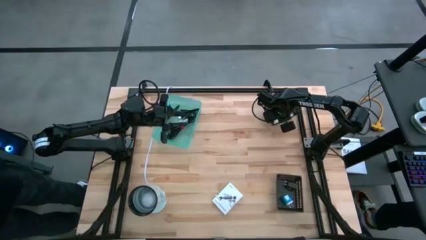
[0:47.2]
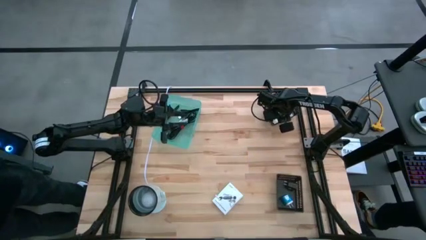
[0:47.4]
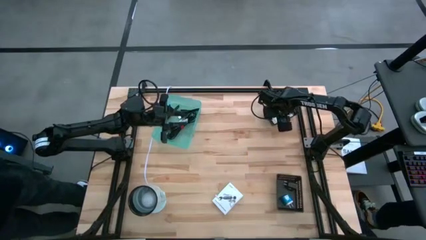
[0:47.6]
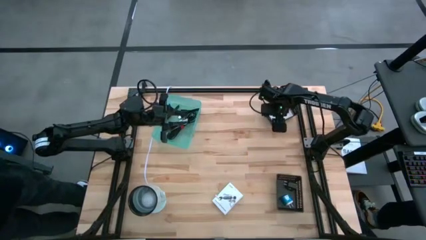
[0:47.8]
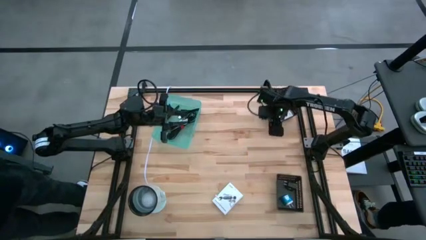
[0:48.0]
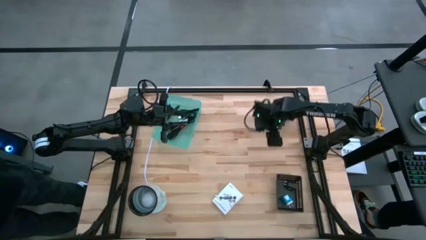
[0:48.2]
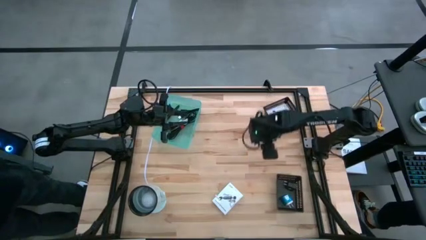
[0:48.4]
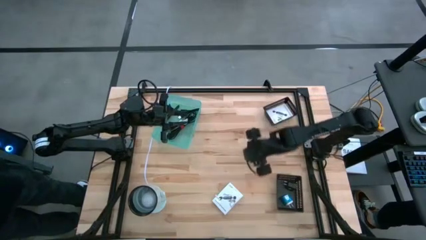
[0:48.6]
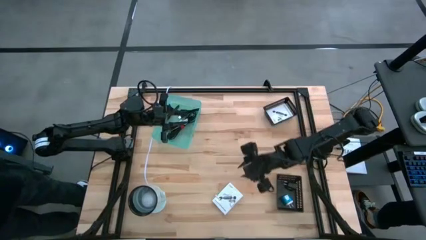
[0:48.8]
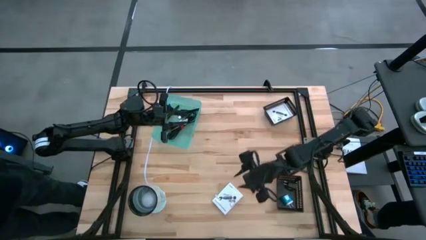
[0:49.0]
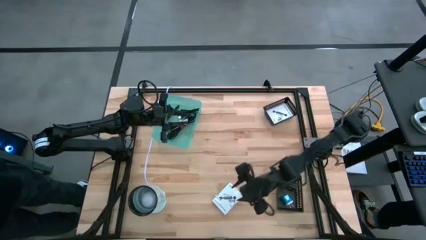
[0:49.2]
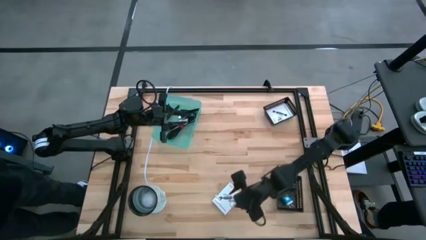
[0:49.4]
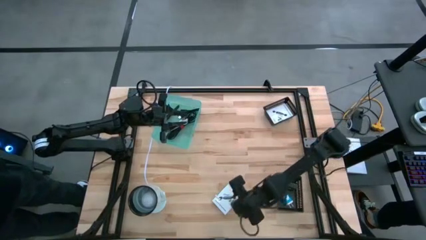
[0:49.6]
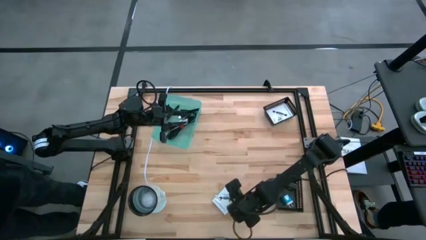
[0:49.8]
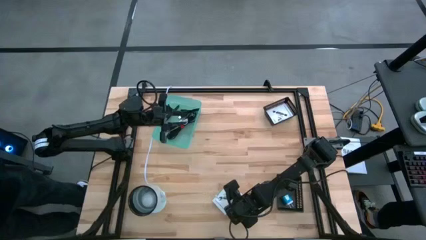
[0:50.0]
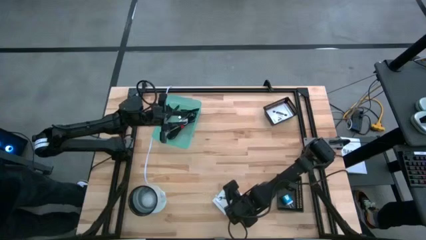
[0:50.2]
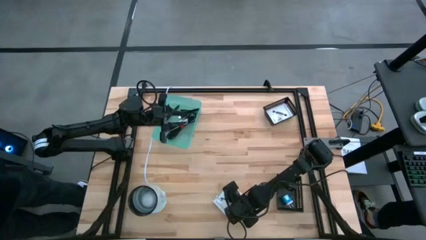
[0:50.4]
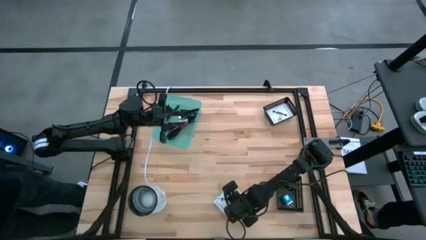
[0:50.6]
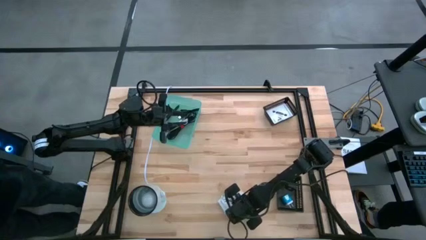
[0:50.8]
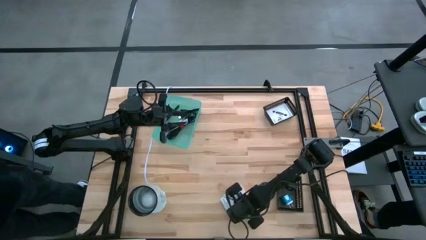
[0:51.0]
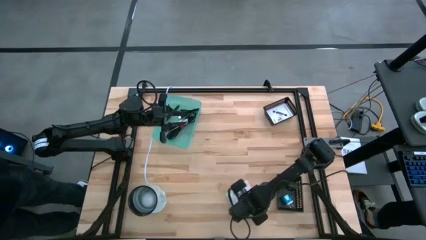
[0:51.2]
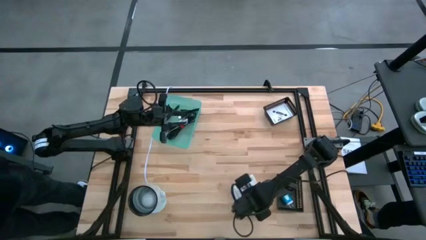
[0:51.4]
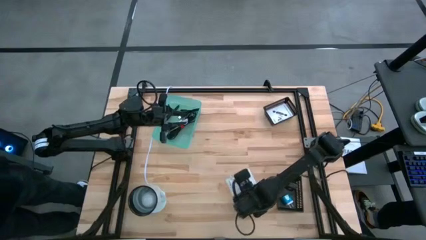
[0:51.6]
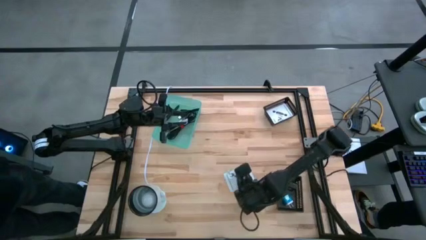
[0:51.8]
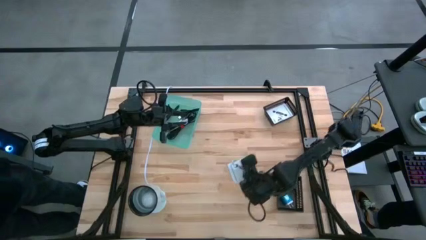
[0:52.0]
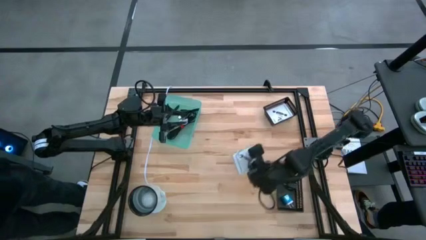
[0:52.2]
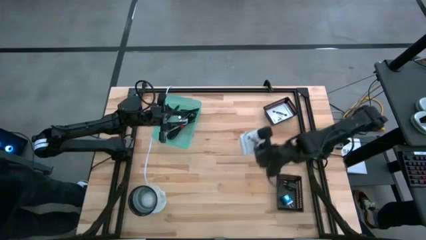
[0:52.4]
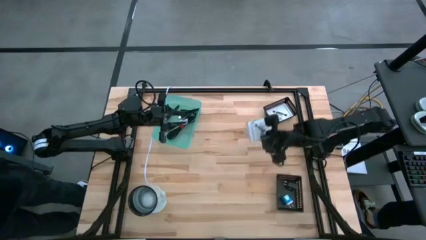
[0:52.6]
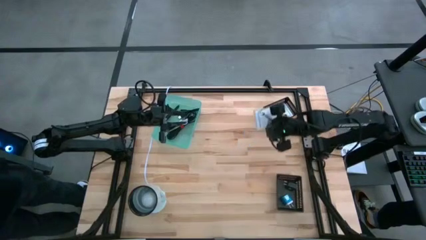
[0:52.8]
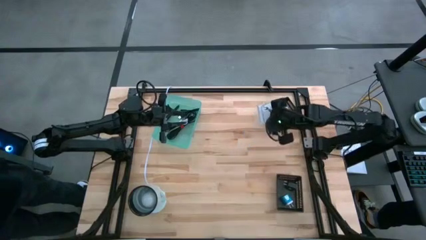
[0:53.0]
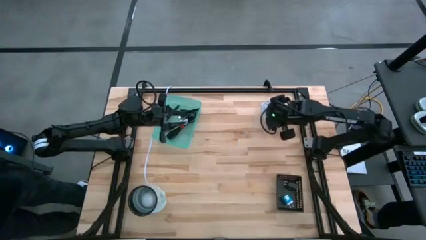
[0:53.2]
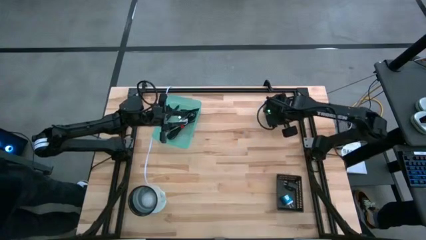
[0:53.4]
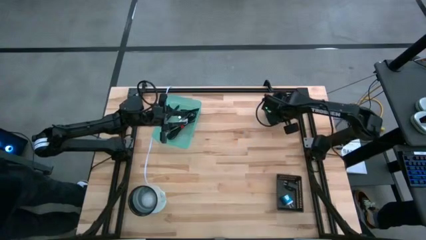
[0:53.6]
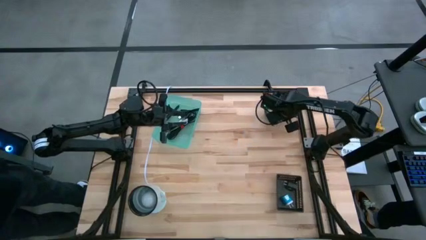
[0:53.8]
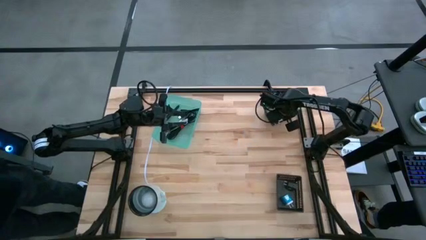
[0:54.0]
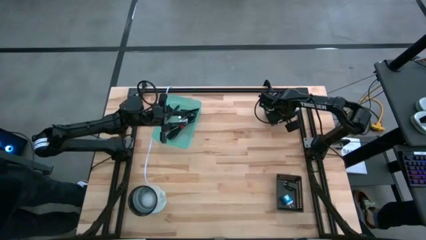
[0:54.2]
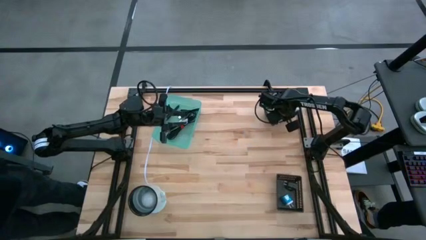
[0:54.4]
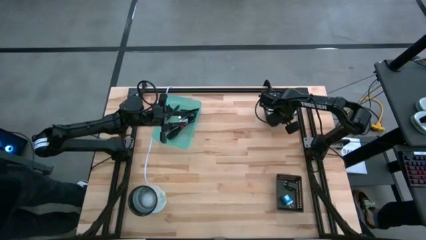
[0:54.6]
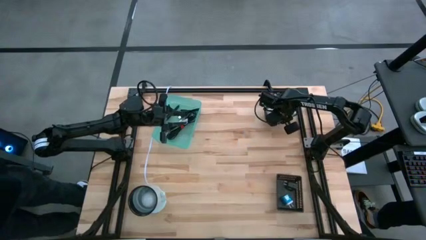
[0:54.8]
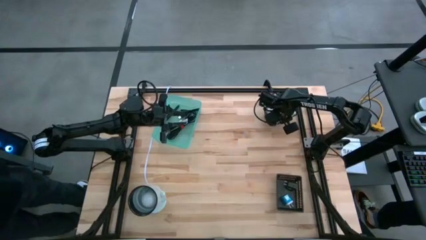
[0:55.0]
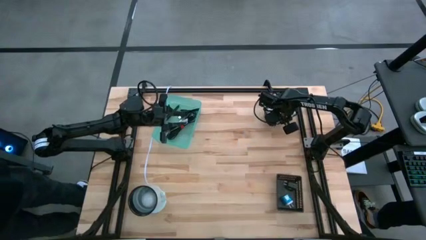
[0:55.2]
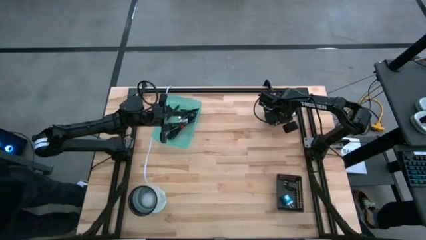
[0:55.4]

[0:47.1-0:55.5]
Task: Pick and place items into bin
Put the white card reader box into the top black bin

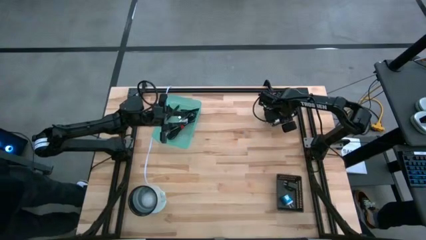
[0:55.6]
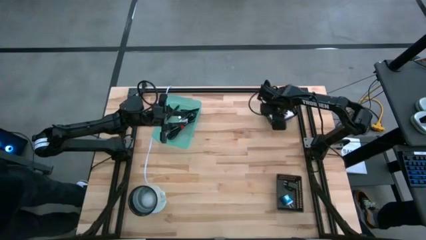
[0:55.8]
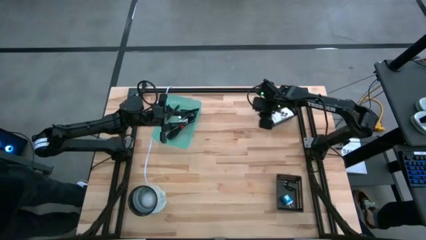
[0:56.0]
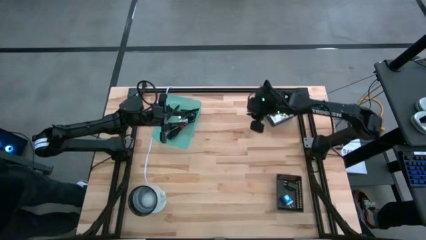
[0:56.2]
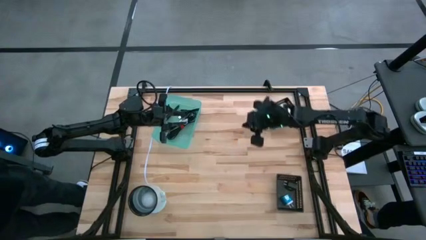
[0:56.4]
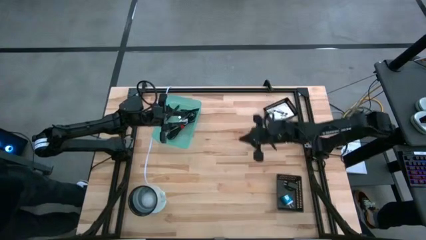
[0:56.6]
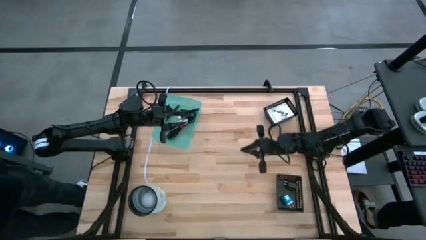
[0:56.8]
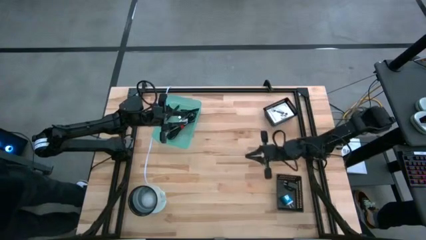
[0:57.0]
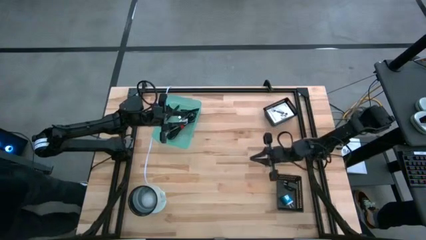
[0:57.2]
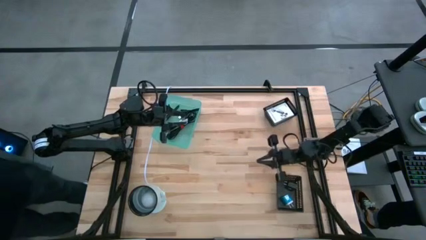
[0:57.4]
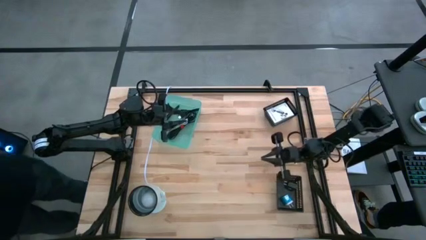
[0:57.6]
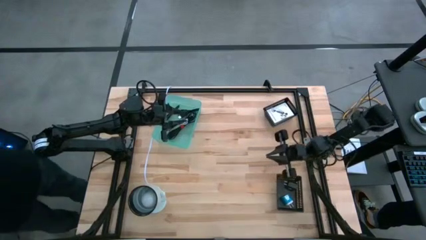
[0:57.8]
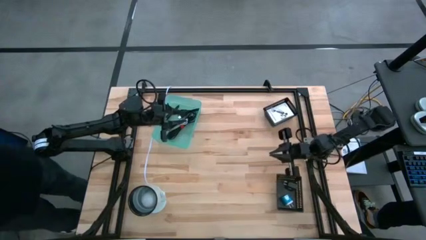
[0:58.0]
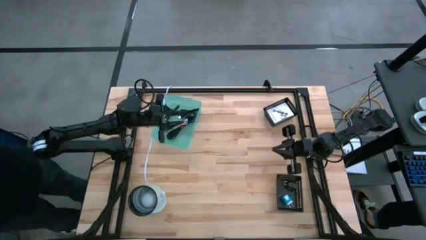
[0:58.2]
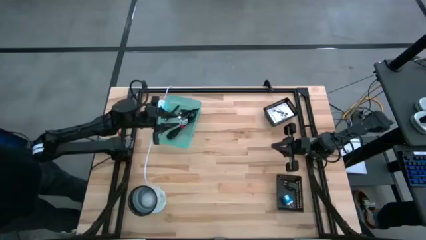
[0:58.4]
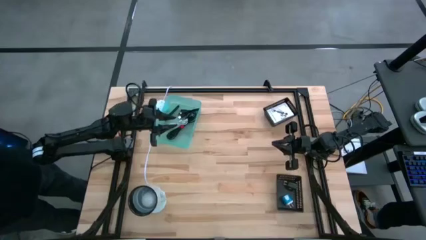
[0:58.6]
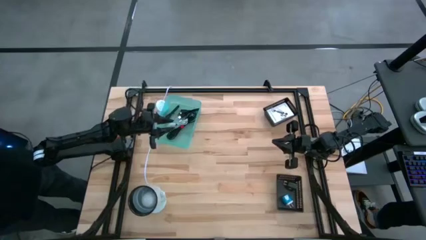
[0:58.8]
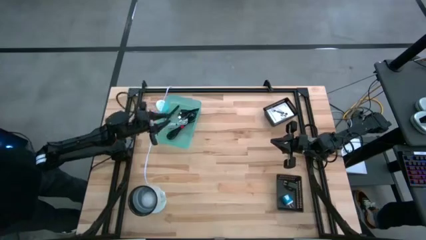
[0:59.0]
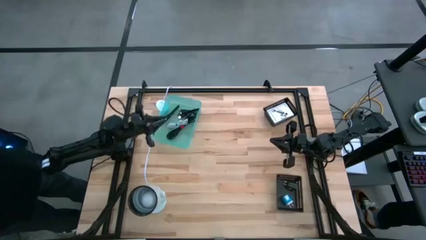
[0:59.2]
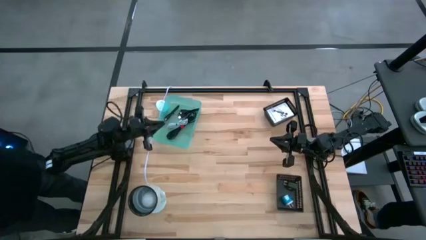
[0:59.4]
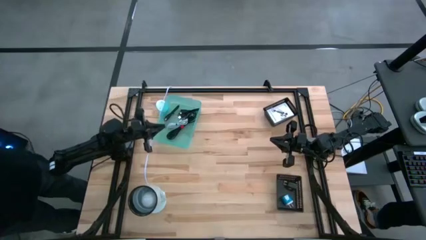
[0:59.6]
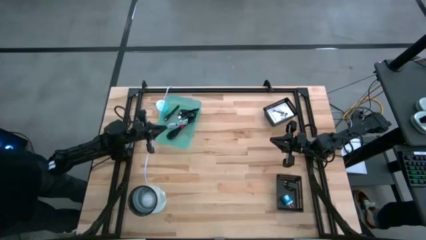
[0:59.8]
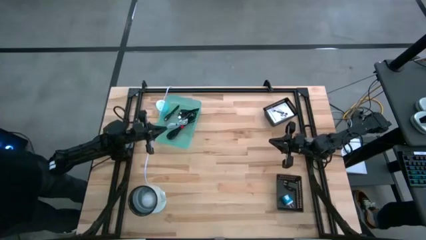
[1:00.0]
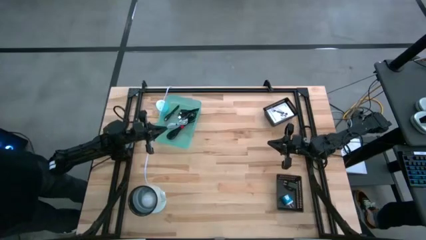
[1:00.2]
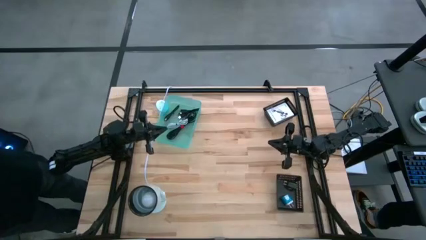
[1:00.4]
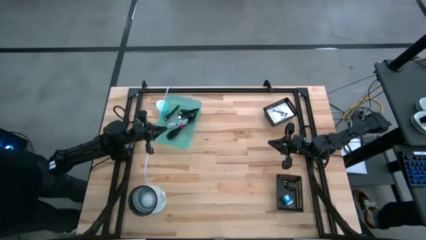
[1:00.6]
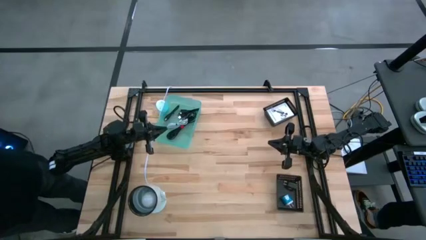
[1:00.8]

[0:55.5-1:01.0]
Return to Home Position

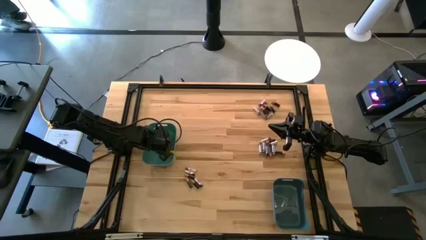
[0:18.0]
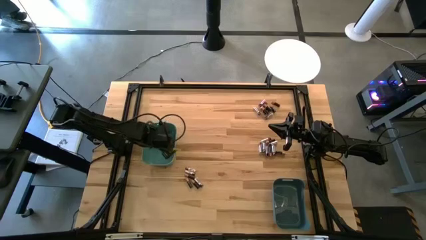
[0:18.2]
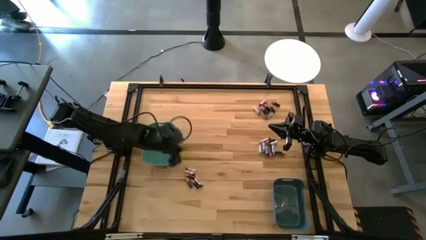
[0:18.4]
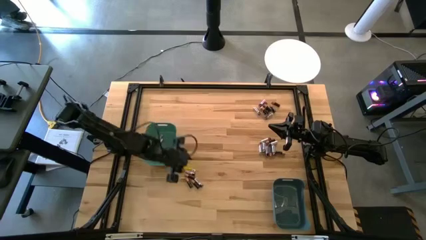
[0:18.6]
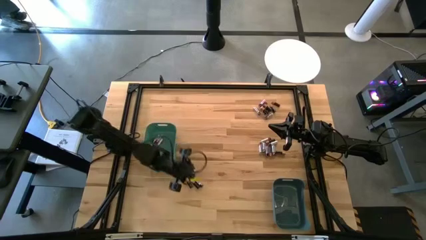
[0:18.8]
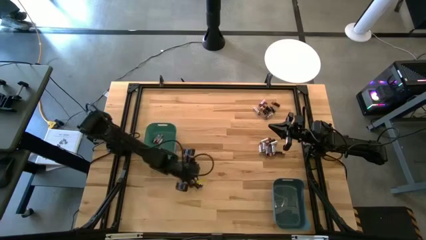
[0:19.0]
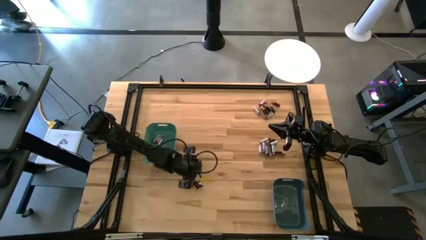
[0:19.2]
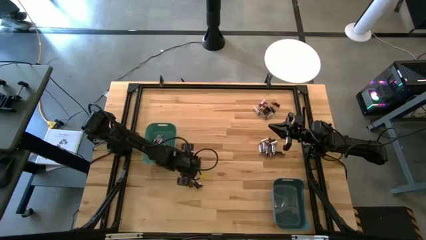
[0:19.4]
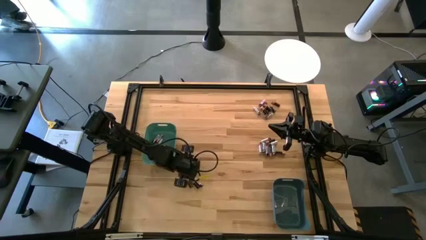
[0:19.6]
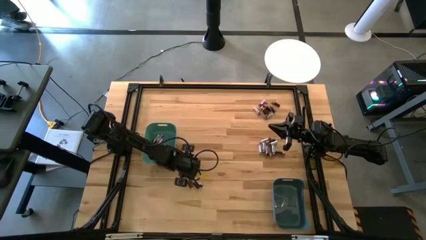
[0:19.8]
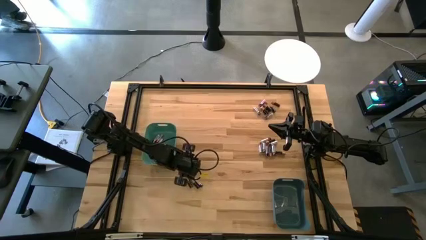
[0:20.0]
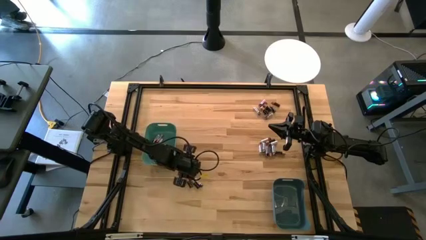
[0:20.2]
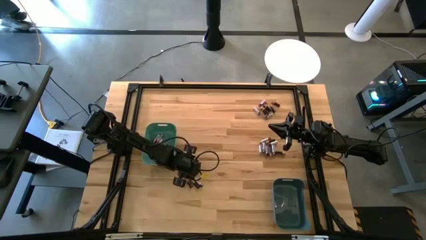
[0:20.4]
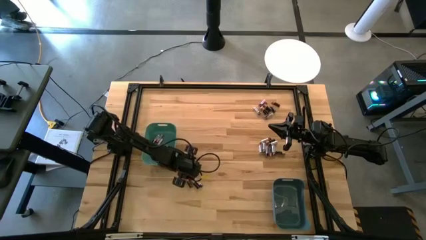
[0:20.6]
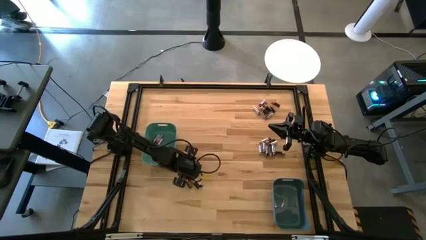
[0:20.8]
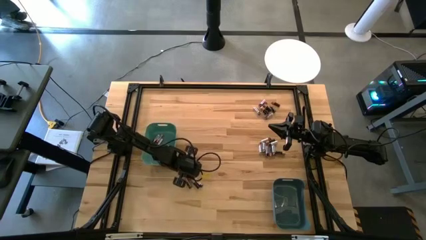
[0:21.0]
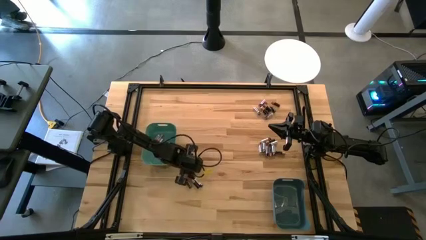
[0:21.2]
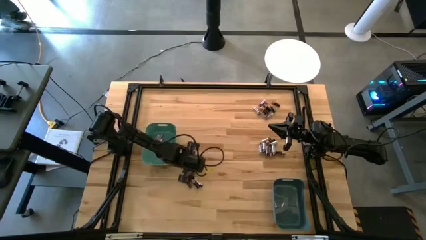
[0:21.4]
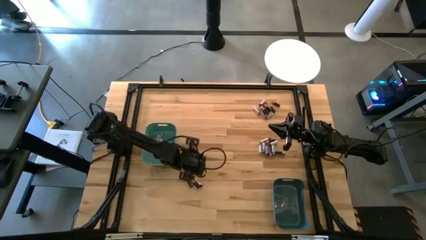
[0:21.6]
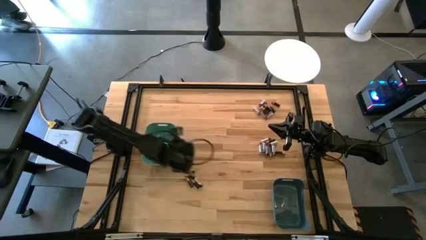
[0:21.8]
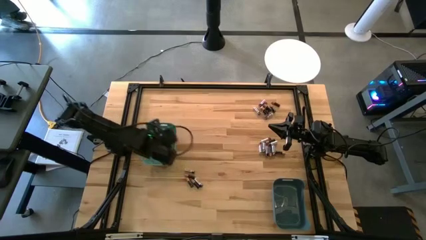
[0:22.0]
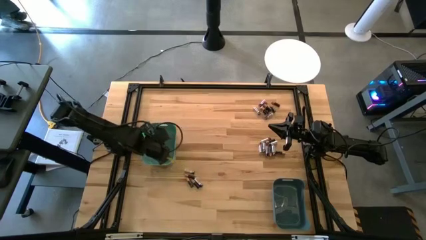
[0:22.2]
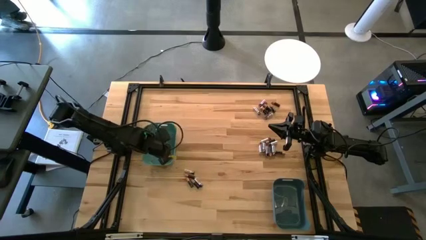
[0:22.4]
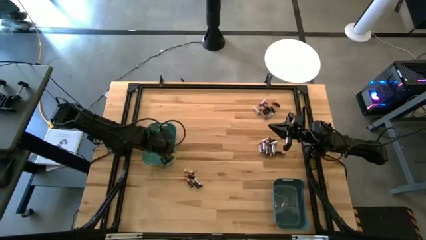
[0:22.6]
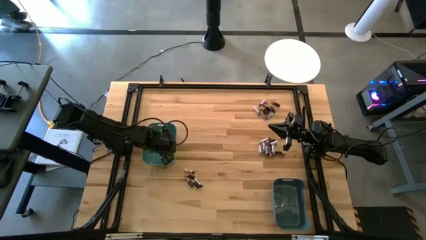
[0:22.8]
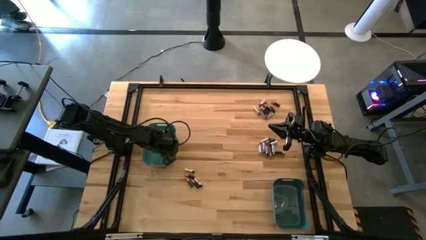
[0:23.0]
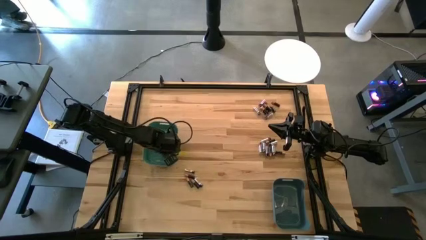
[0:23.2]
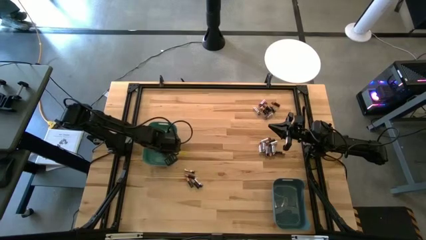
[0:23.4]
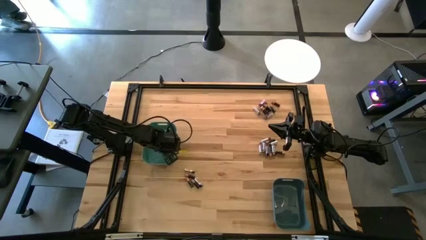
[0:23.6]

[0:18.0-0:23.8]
Task: Sort batteries
Put the silver battery into the green bin
